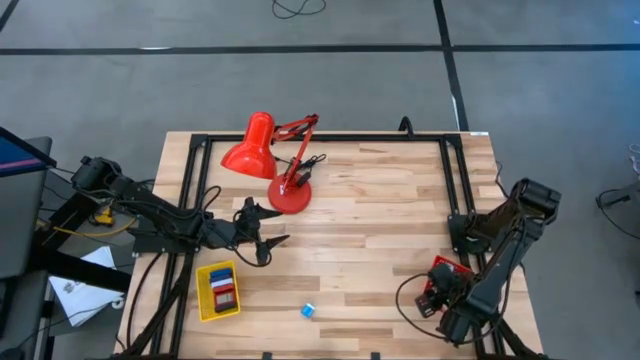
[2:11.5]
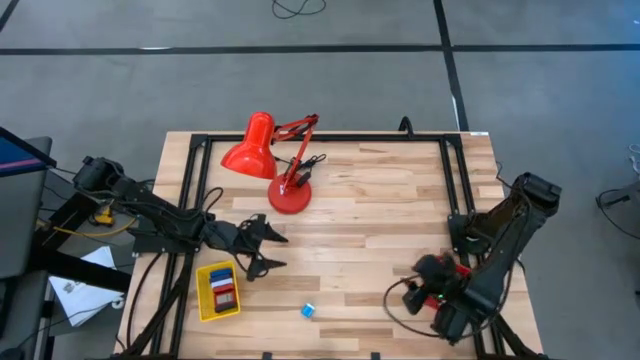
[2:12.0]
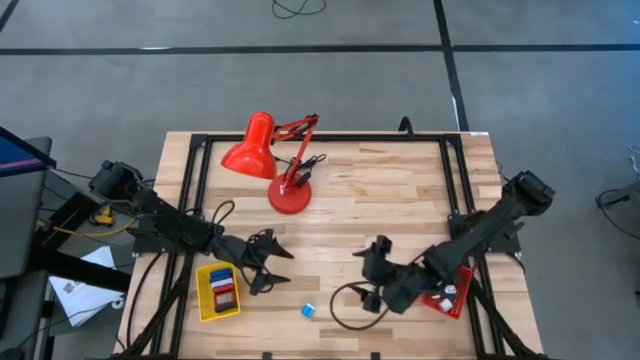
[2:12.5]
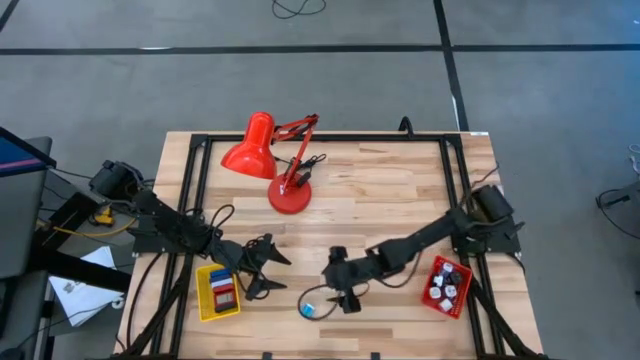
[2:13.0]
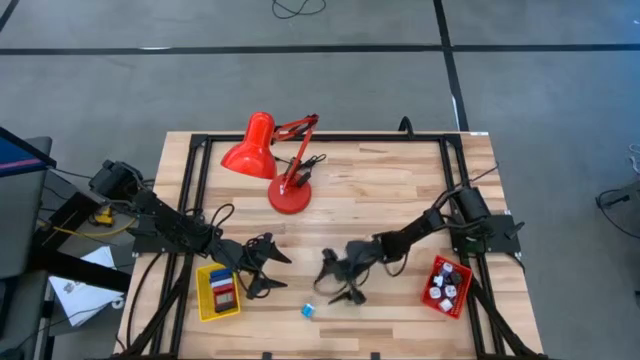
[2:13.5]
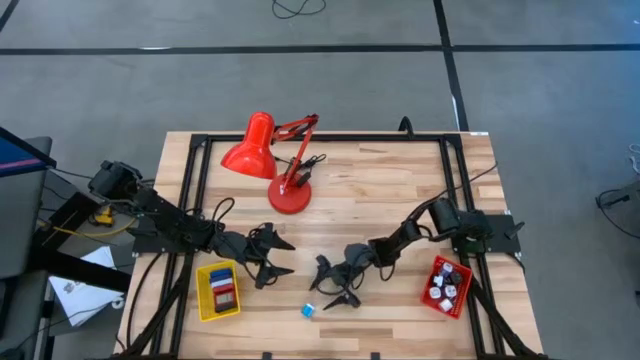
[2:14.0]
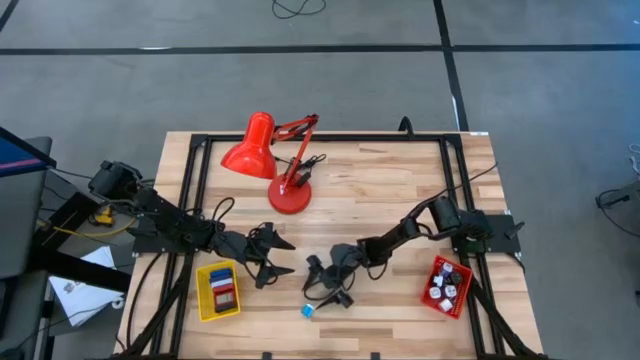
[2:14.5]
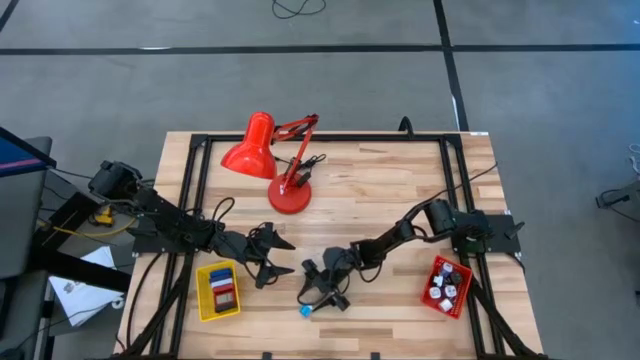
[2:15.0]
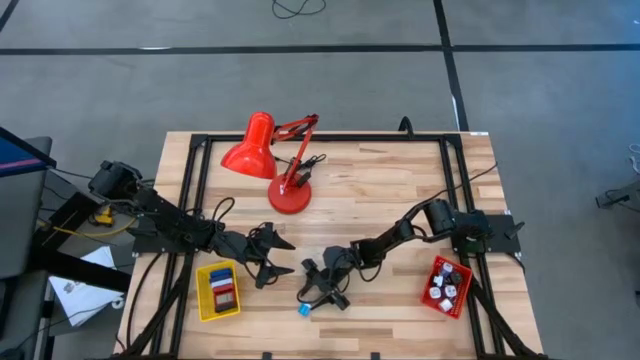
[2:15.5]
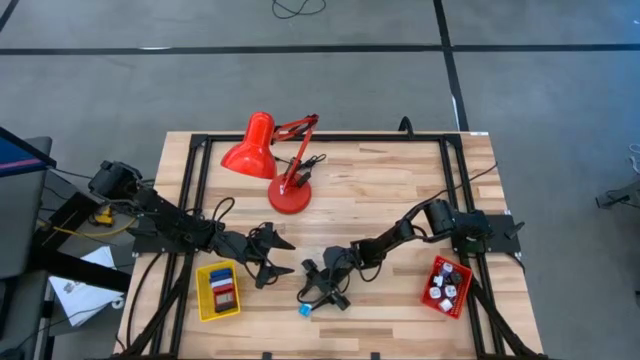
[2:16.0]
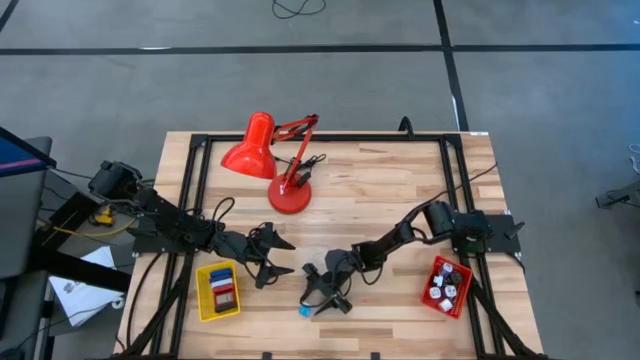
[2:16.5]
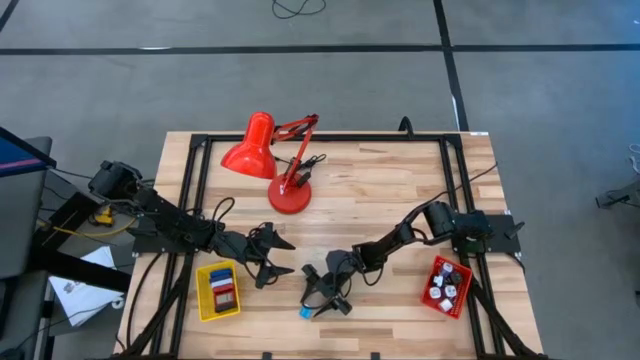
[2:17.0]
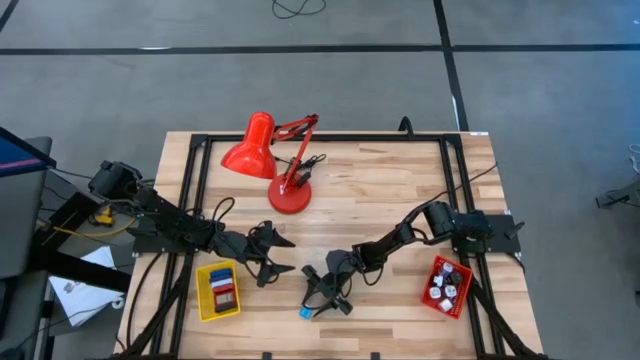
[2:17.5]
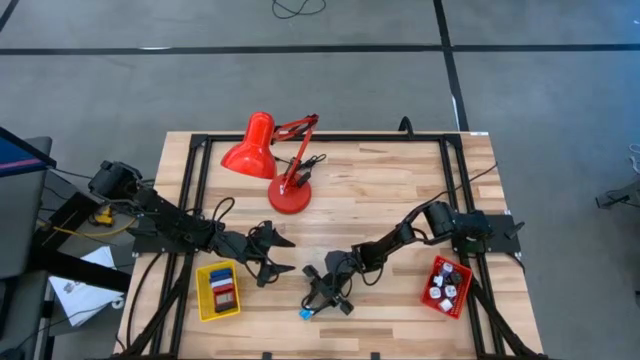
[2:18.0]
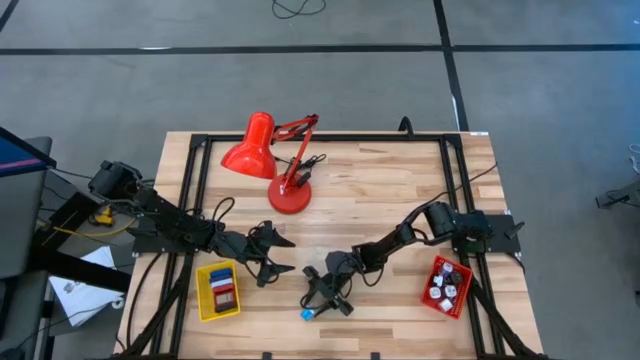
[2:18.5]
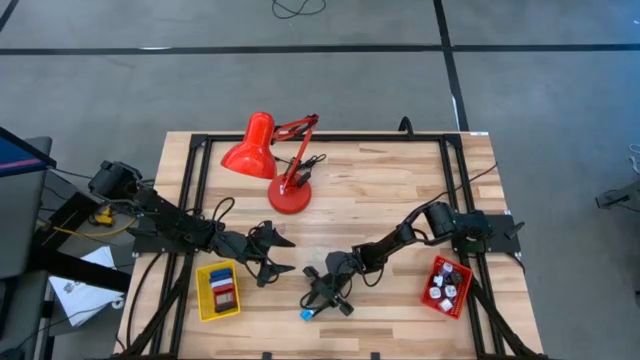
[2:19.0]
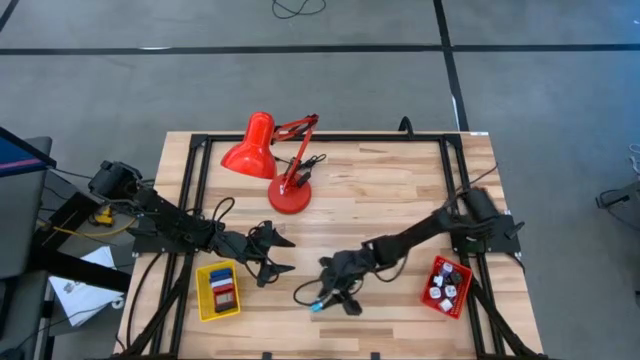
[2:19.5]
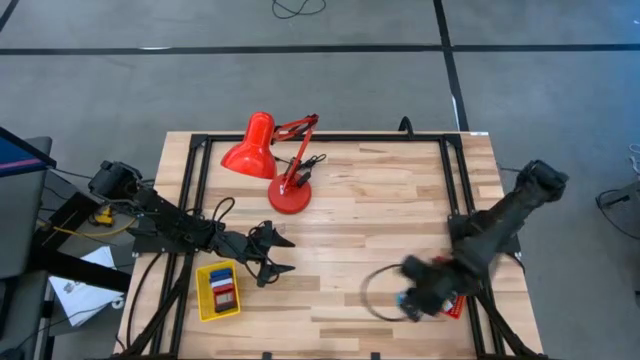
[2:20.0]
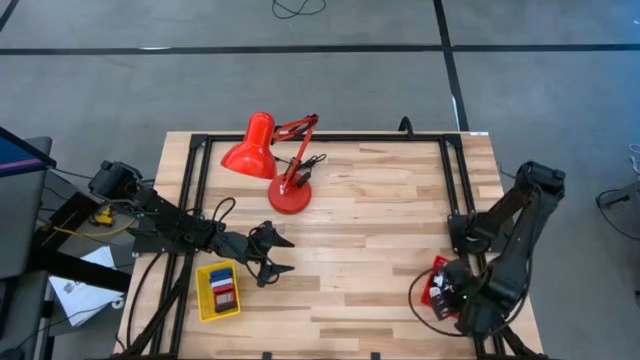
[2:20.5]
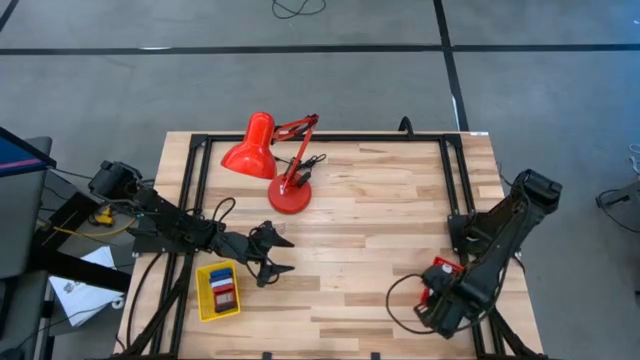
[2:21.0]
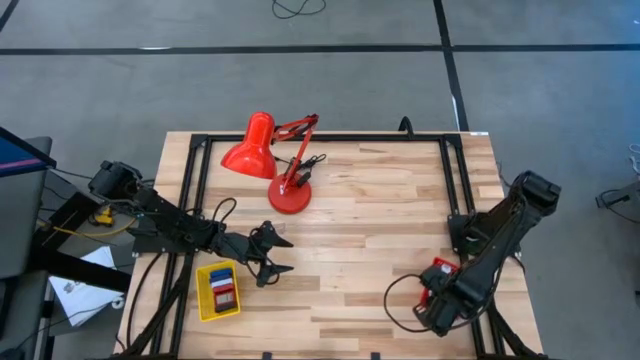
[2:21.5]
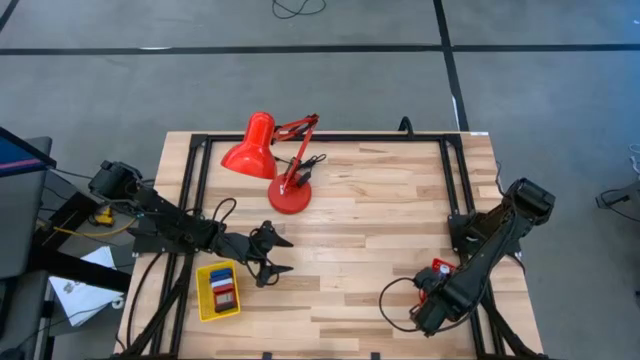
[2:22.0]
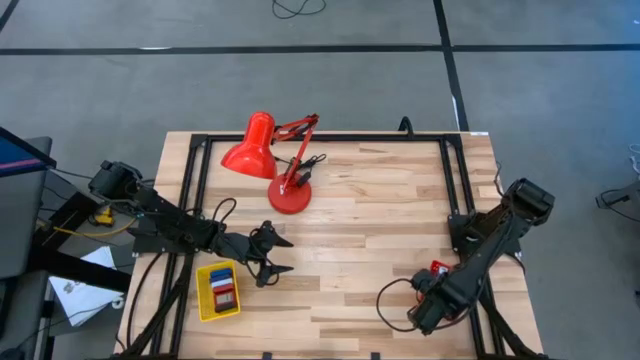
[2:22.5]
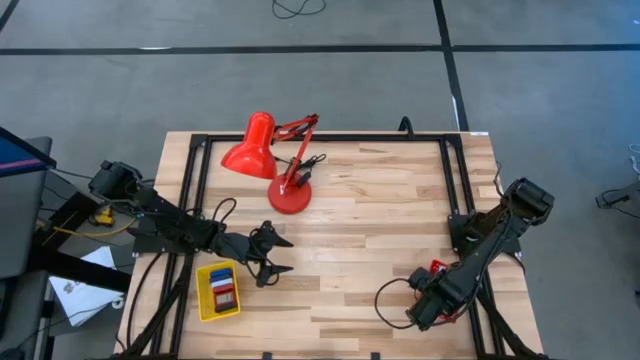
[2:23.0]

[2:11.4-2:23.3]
Task: Pick & Place Office items
Put the light blue charger adapter into the red bin

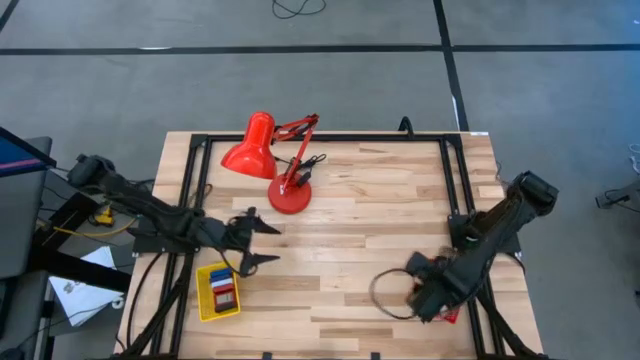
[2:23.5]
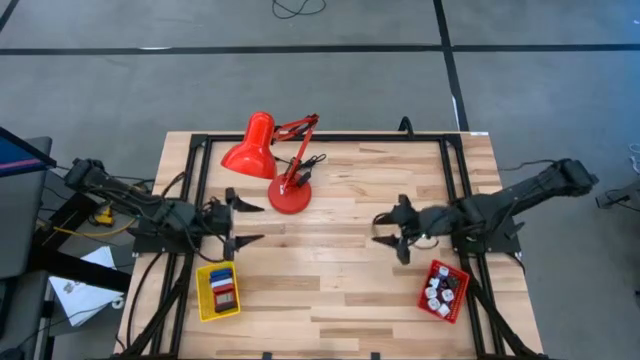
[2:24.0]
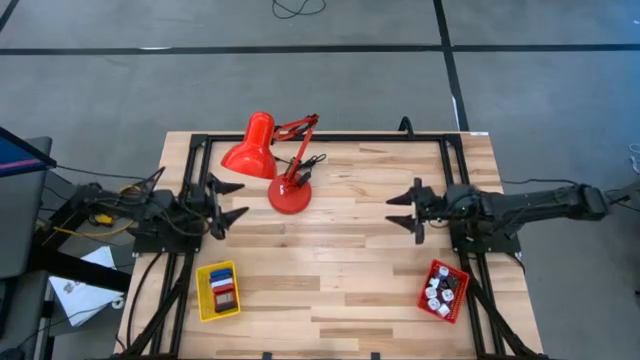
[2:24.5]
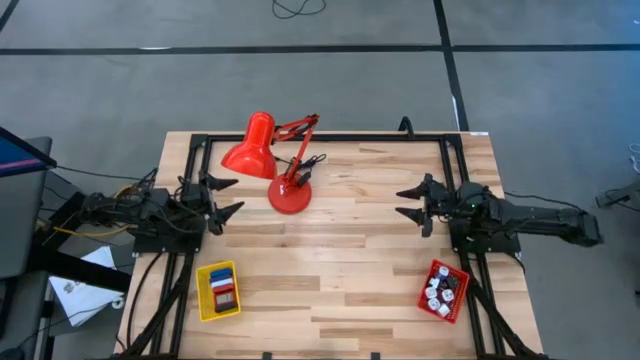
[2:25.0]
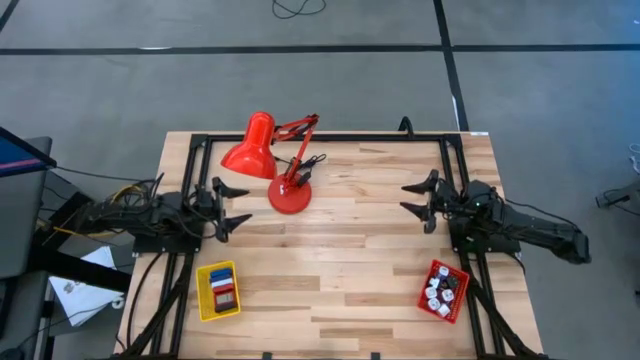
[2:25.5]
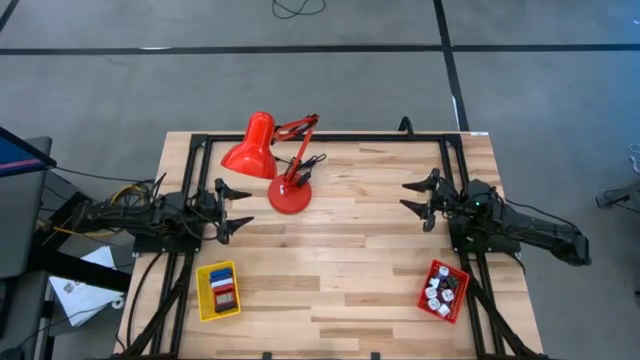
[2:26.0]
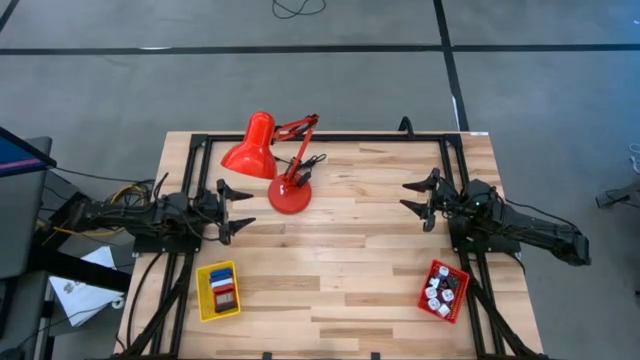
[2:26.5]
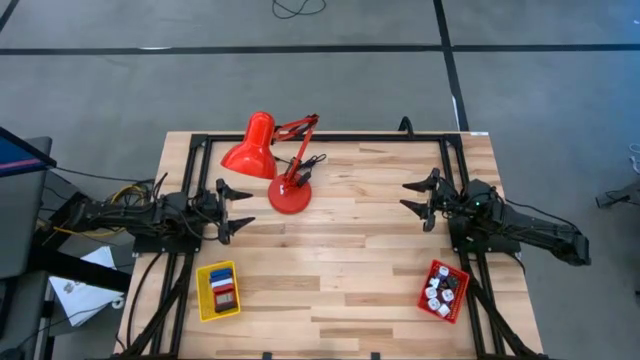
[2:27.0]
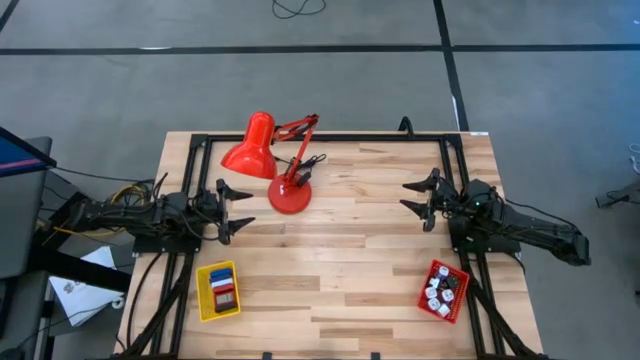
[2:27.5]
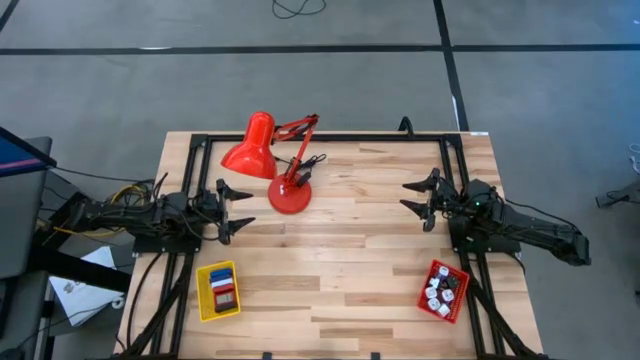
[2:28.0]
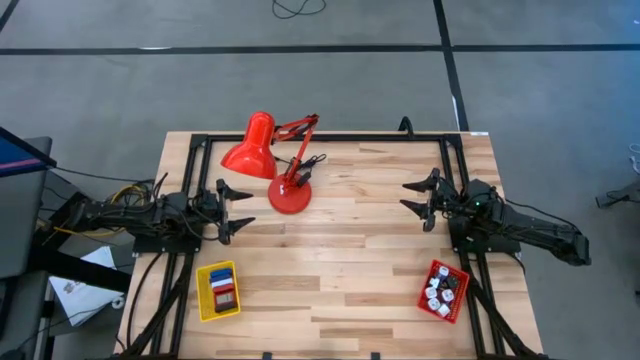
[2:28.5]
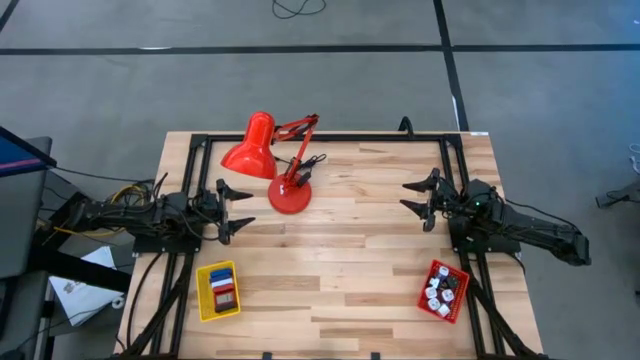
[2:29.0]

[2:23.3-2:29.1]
Return to Home Position

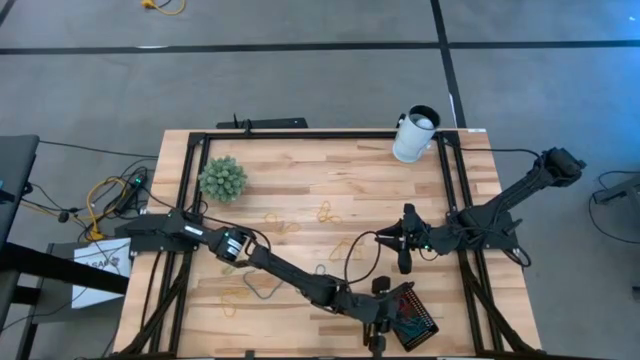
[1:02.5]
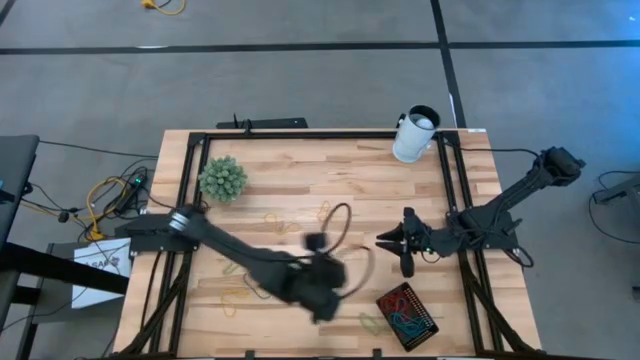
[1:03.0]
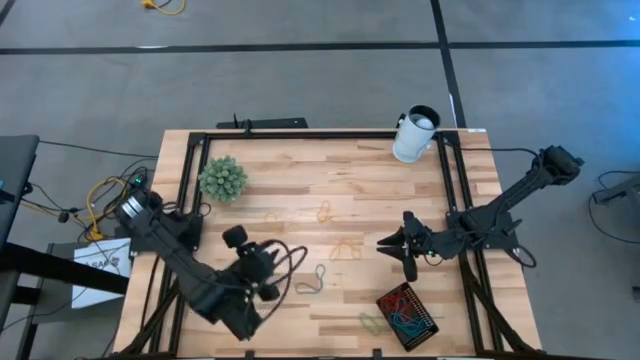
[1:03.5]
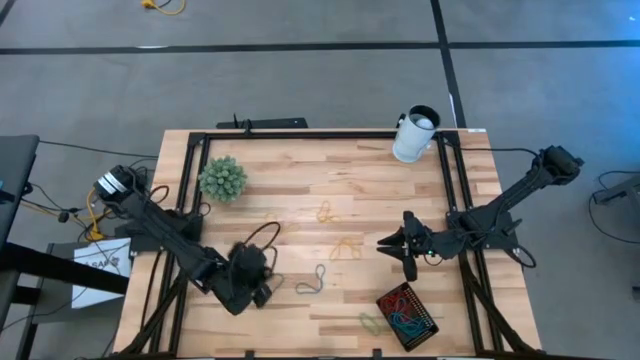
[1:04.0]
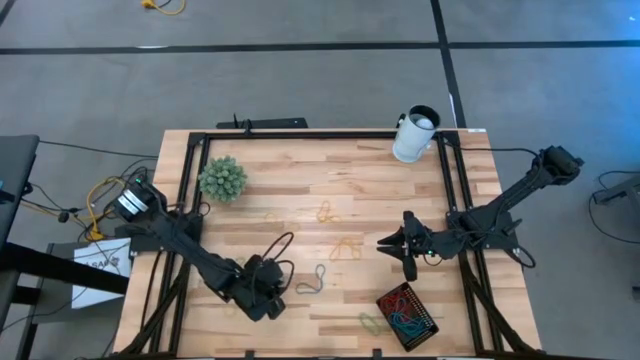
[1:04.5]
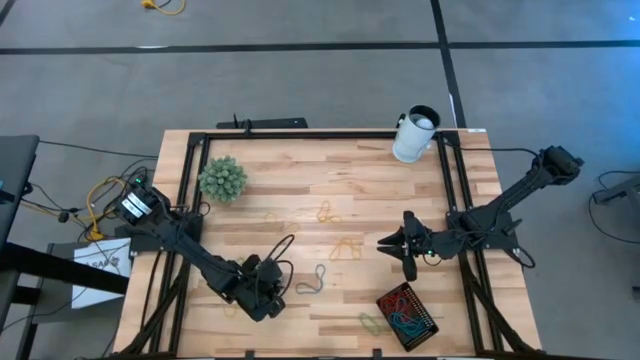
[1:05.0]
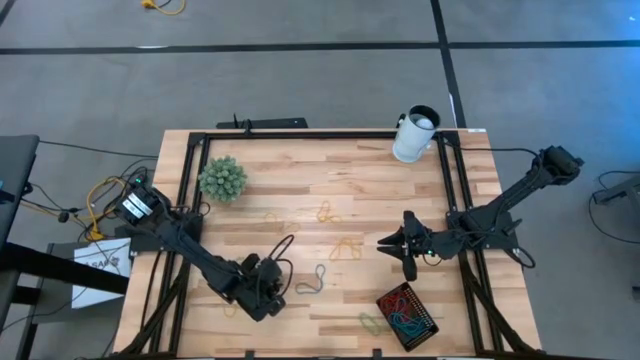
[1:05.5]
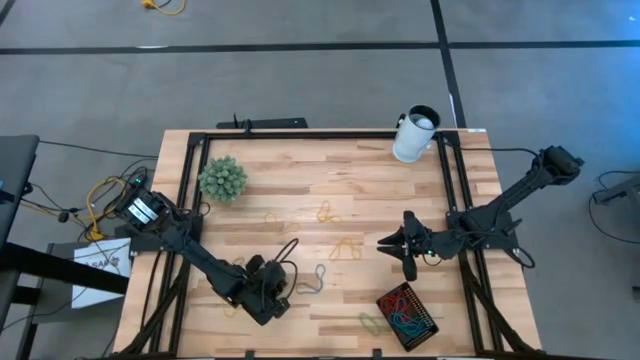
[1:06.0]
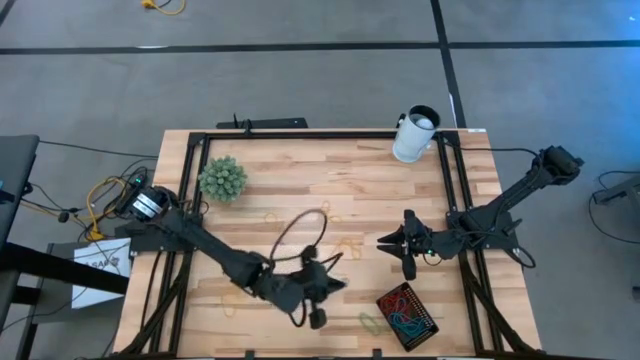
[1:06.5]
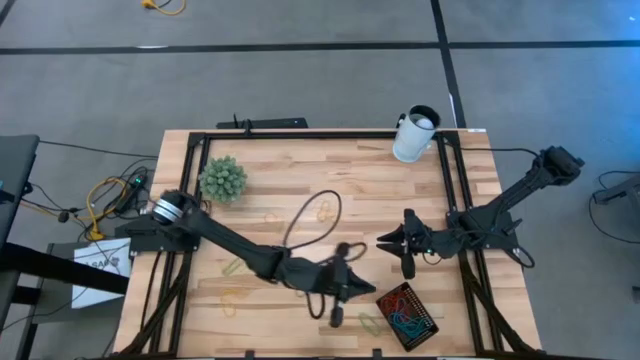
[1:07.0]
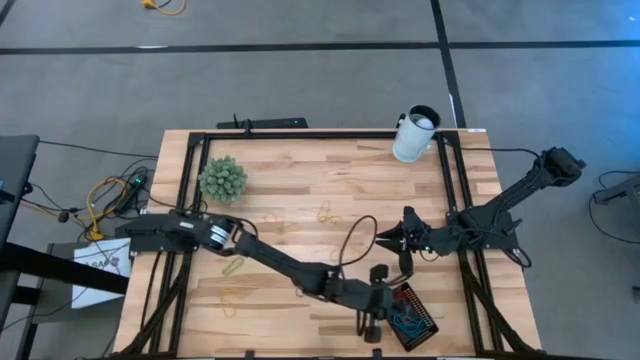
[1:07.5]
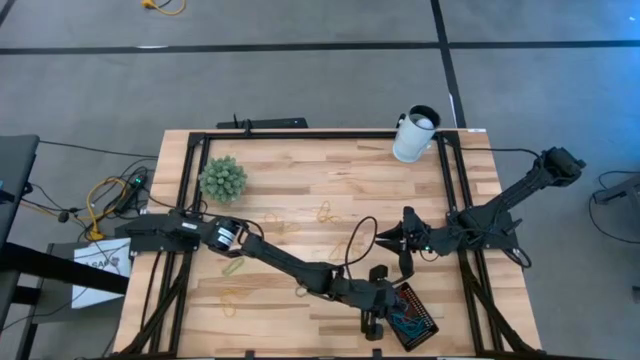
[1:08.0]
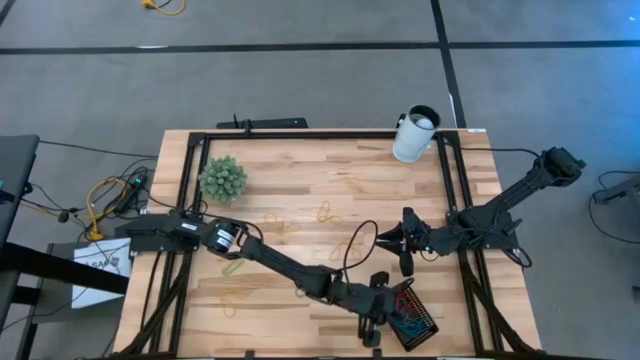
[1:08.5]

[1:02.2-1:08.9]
Task: Pick and place rubber bands into bin
Put the blue rubber band into the black basket
